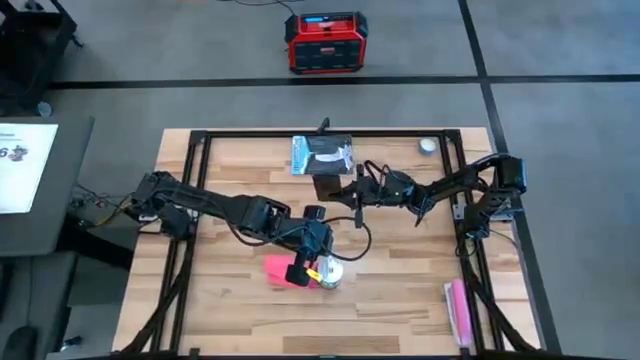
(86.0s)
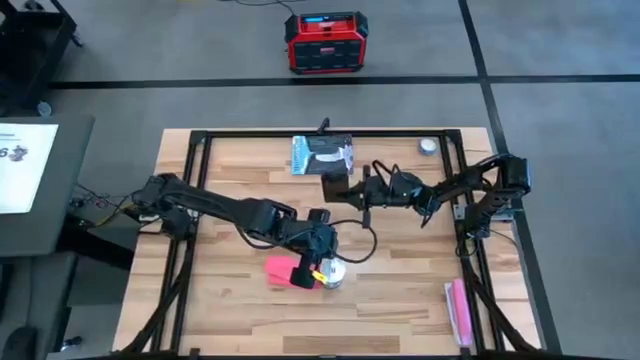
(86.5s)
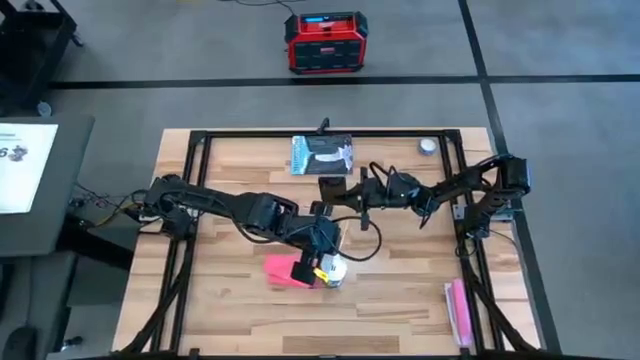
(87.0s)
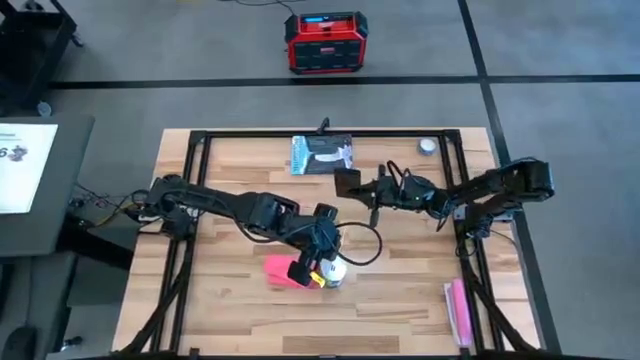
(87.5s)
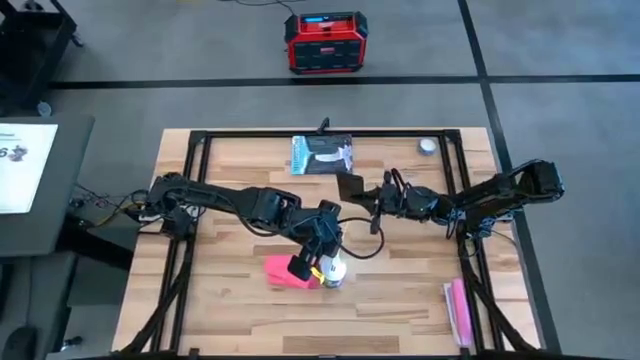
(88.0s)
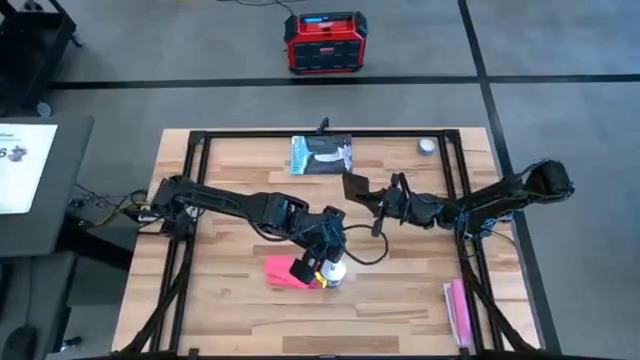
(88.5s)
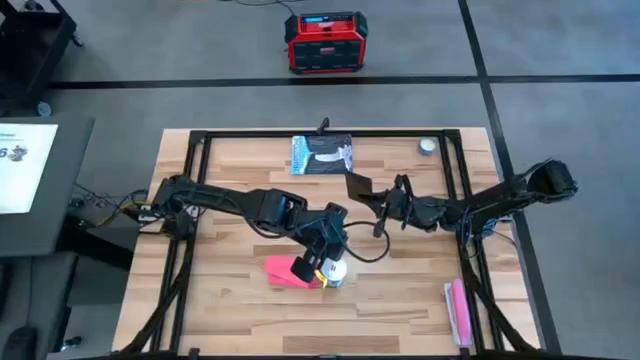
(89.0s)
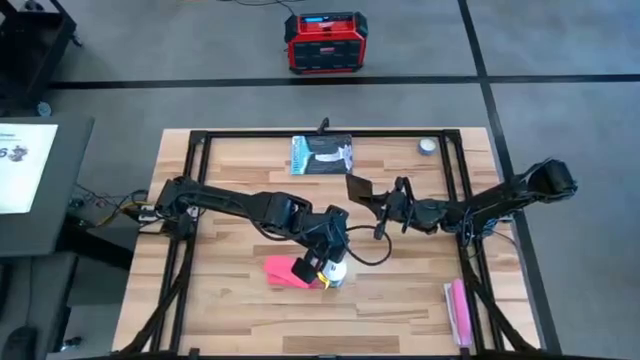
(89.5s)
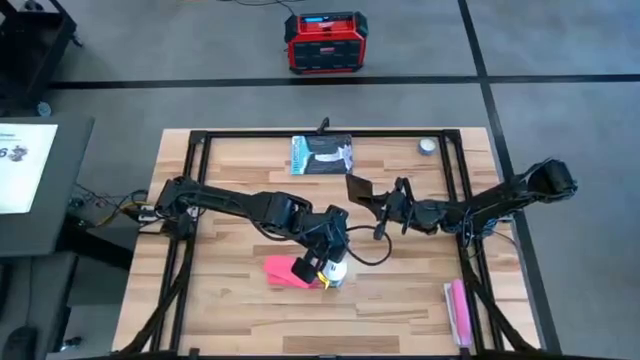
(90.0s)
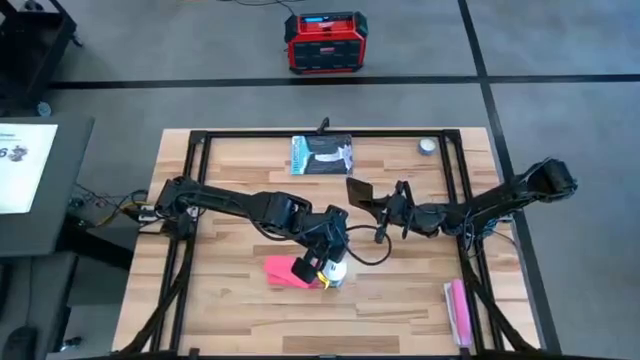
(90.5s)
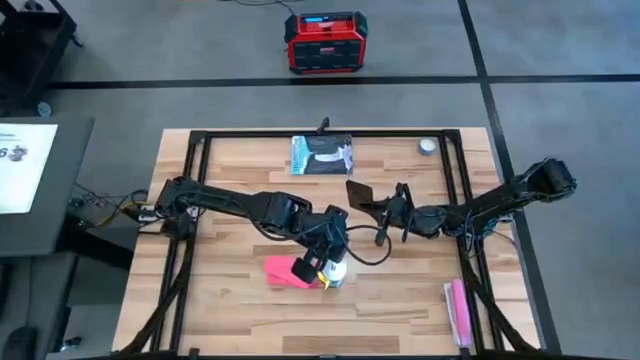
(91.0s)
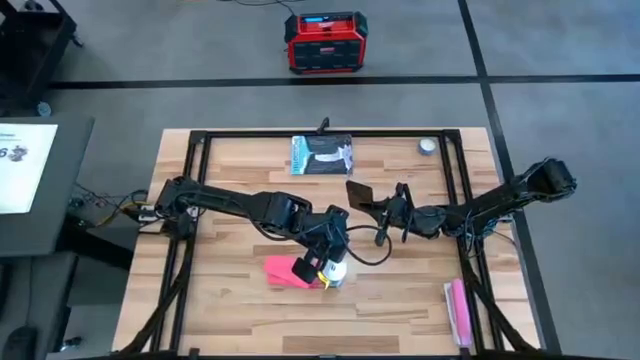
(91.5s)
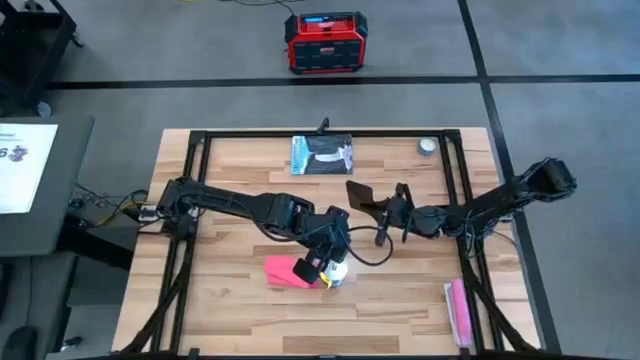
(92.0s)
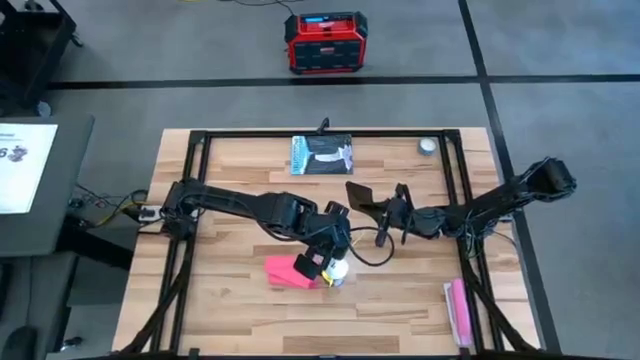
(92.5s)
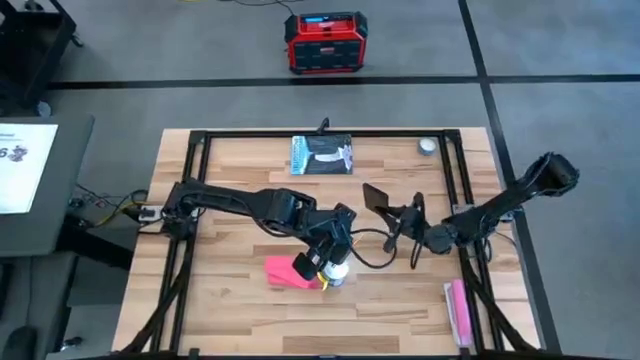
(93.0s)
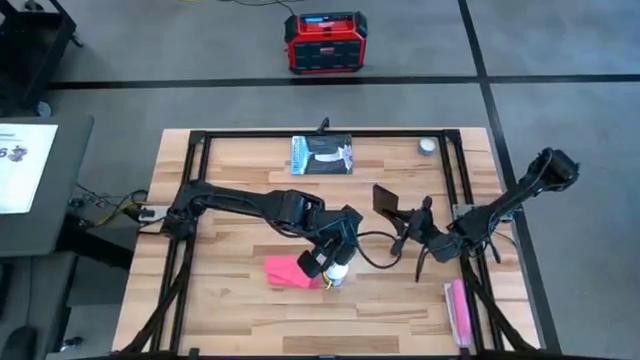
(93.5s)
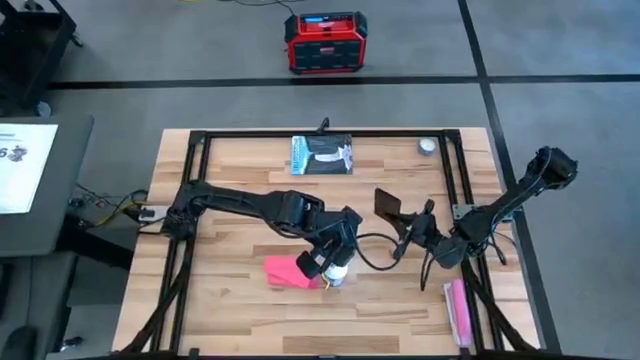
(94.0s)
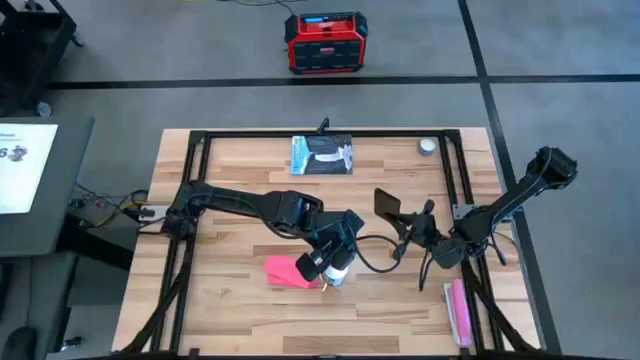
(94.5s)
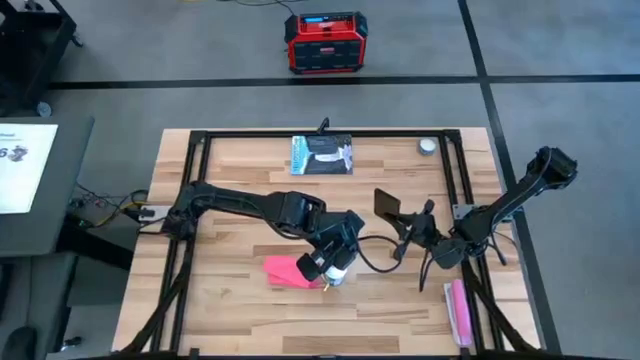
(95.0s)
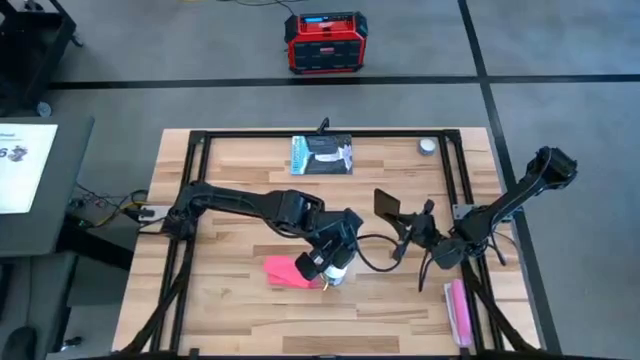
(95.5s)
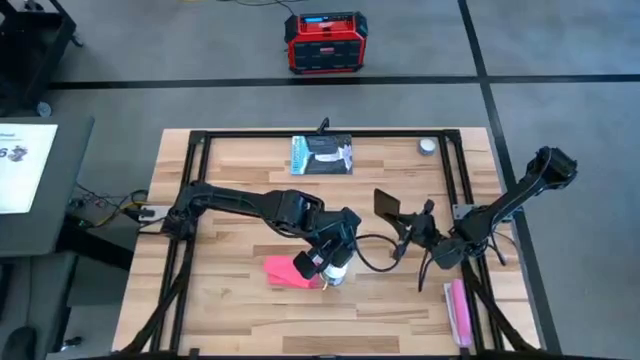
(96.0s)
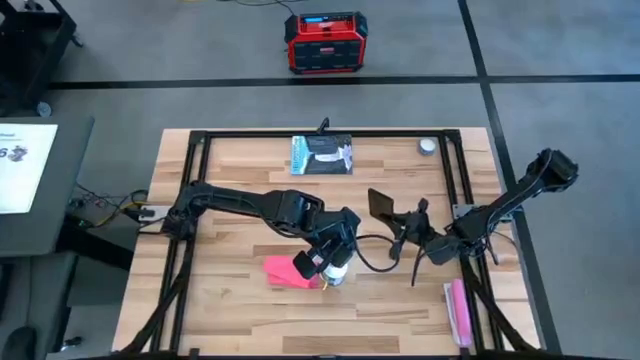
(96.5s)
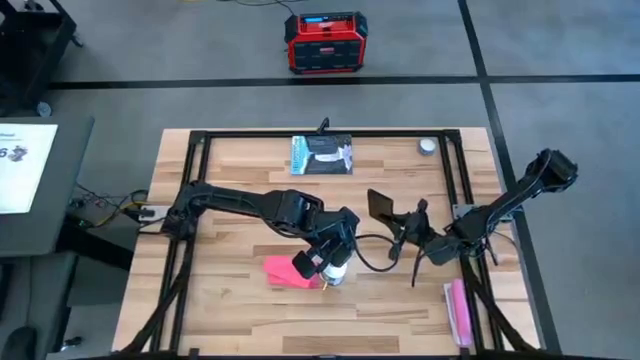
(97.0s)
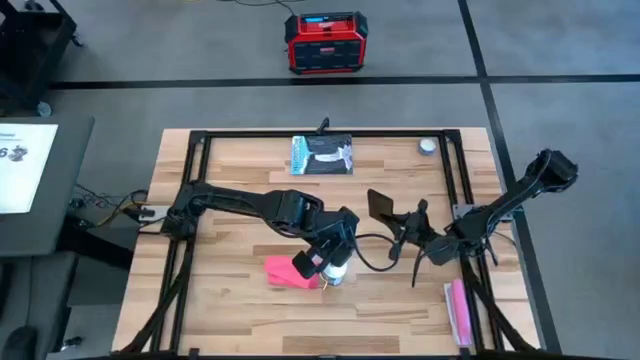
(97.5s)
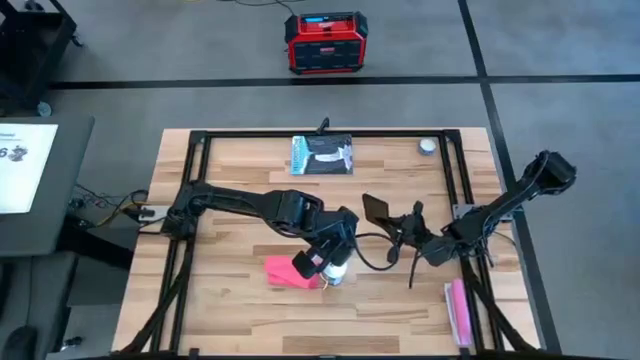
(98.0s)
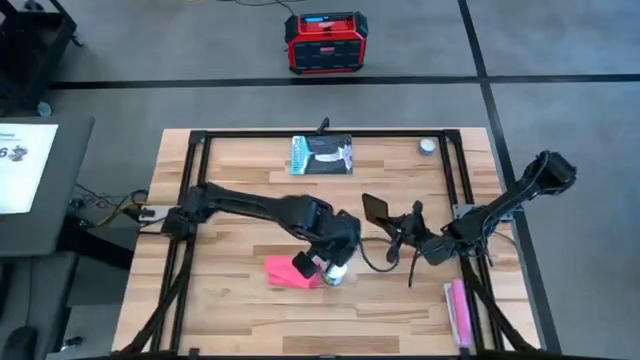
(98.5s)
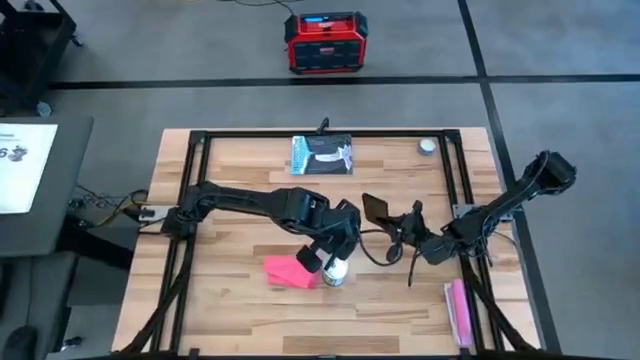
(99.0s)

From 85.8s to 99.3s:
Task: Apply microfiber cloth
Spray the back of the cellphone using the spray bottle

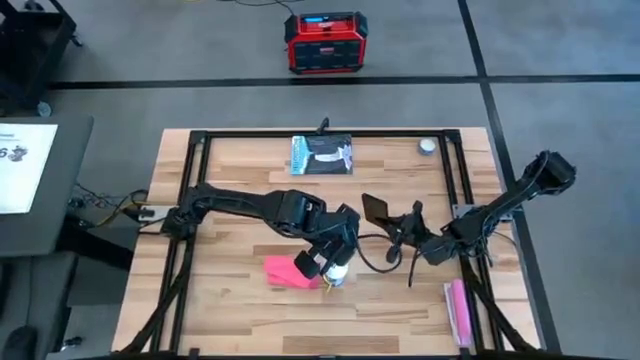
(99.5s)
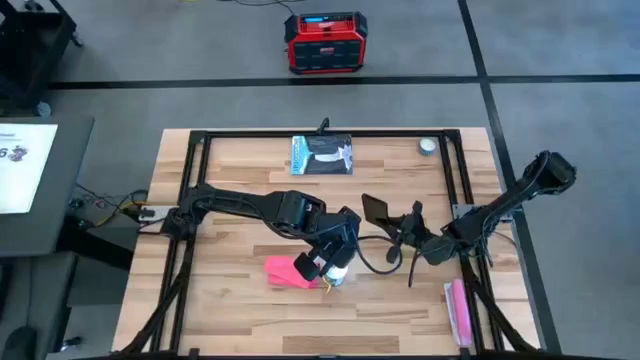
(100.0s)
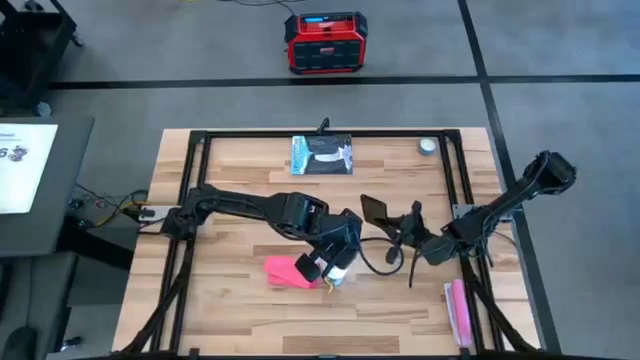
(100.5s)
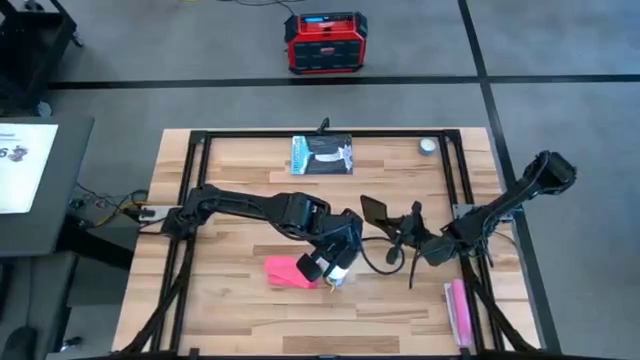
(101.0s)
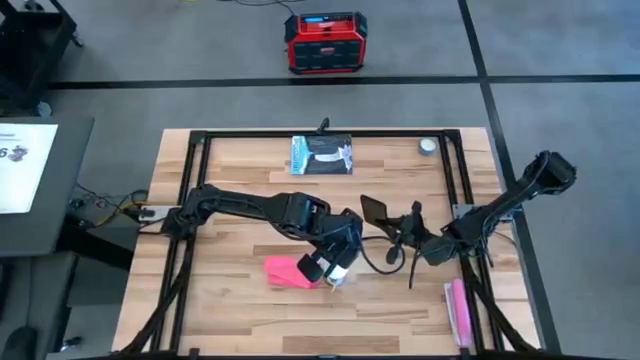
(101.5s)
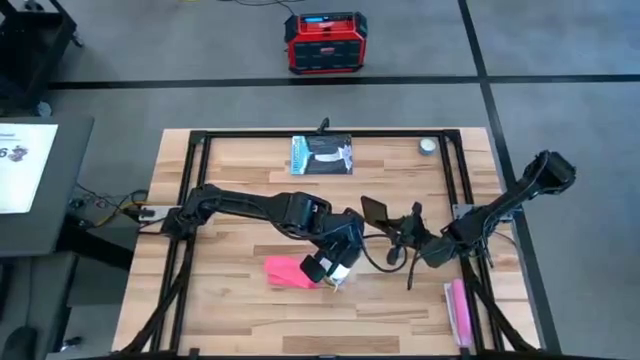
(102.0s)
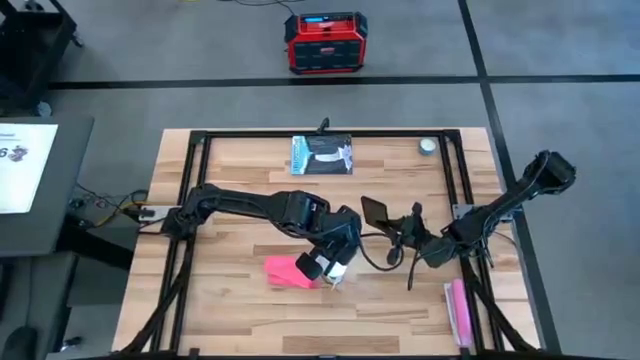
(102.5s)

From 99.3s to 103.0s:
Spray the back of the cellphone using the spray bottle

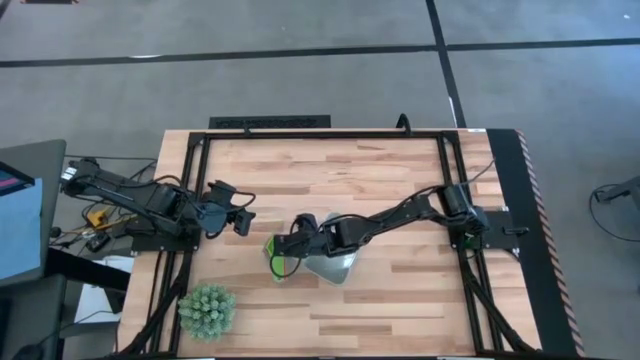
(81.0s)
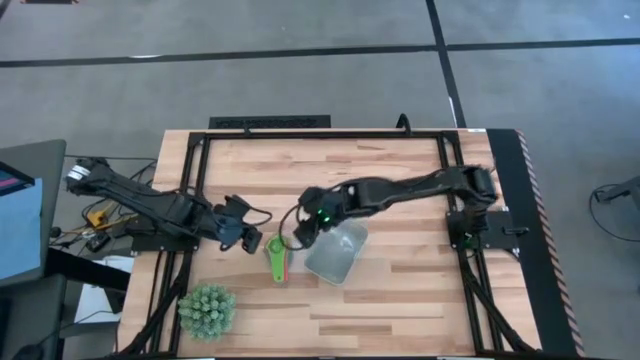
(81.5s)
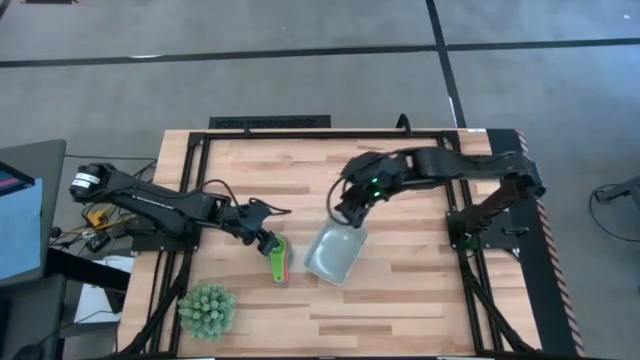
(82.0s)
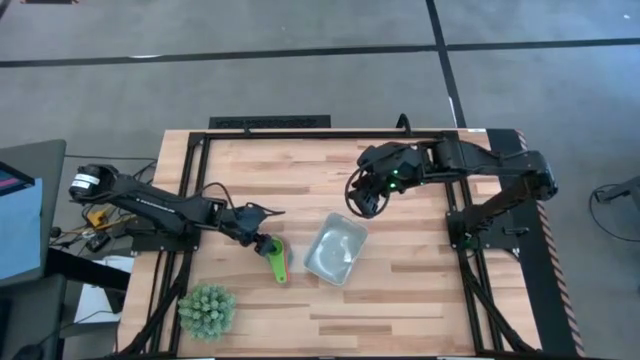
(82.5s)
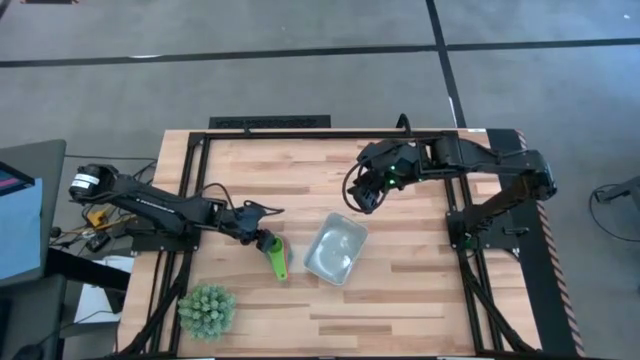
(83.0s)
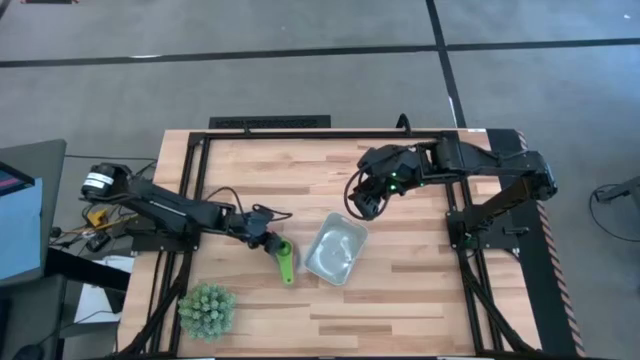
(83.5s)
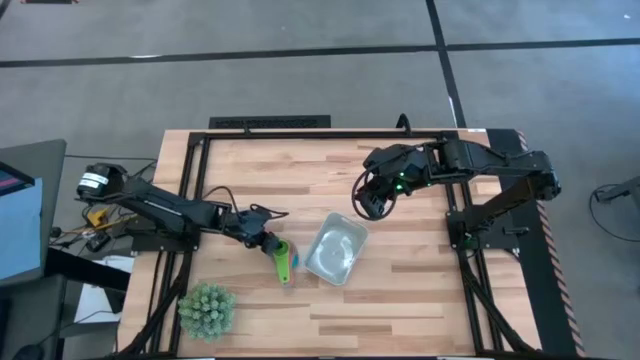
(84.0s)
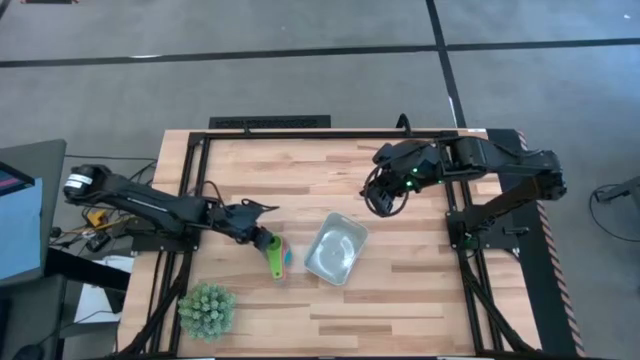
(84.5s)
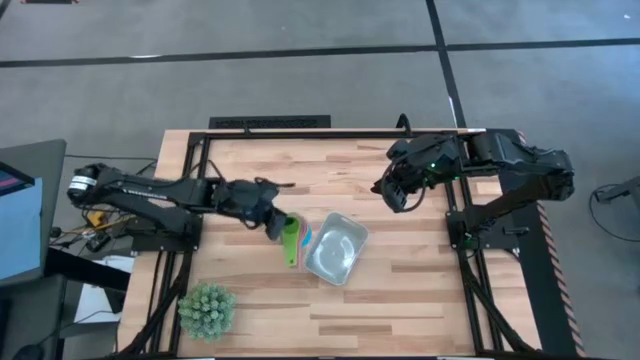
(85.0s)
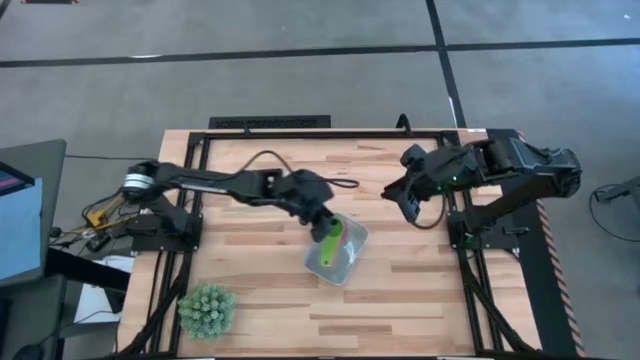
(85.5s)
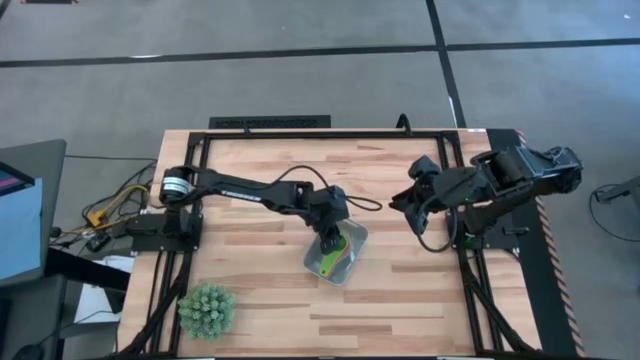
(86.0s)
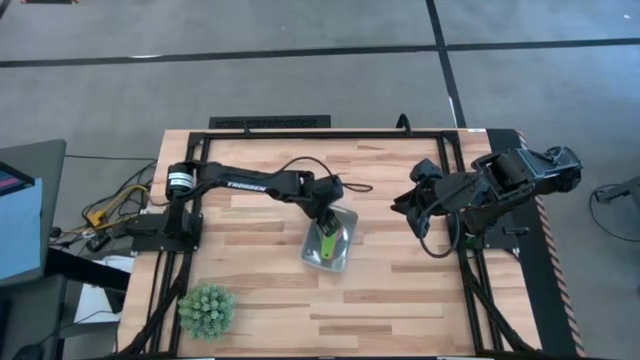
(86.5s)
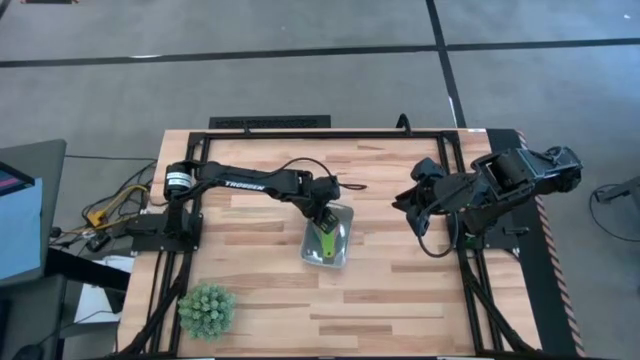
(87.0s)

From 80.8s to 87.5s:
Task: Nest measuring cups in basket
Put the stacked measuring cups into the gray bin
